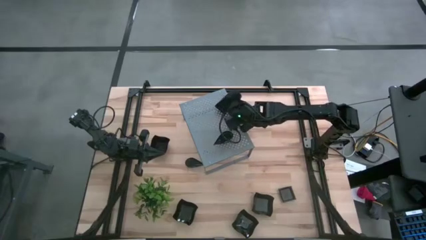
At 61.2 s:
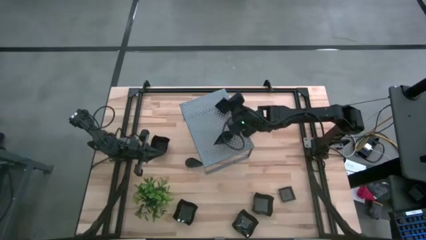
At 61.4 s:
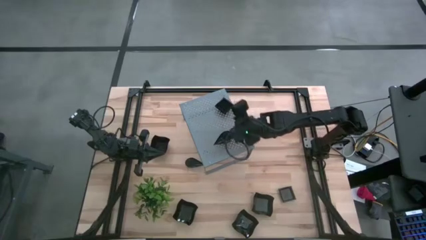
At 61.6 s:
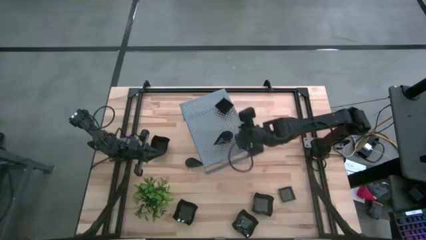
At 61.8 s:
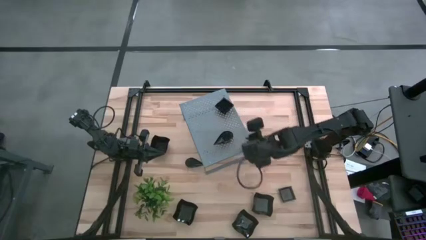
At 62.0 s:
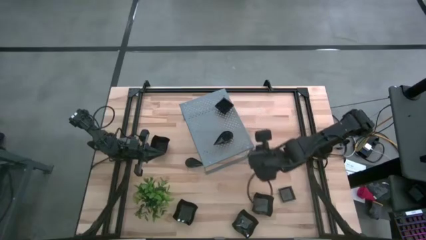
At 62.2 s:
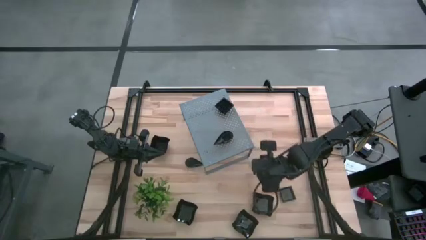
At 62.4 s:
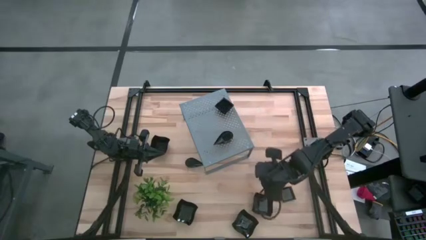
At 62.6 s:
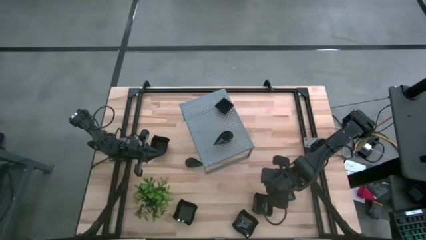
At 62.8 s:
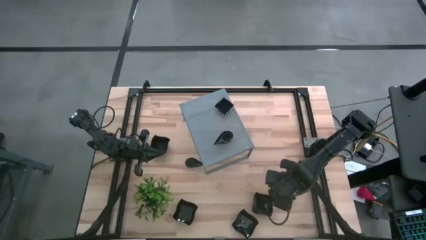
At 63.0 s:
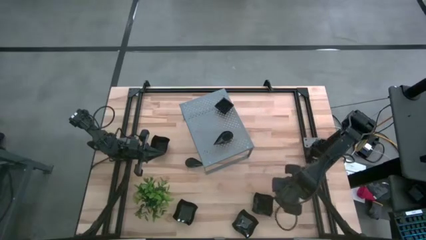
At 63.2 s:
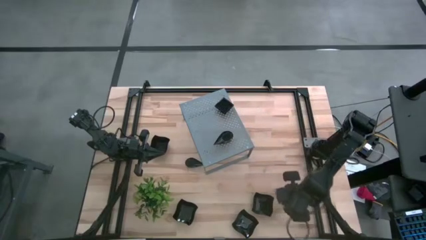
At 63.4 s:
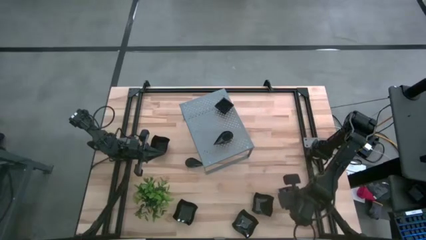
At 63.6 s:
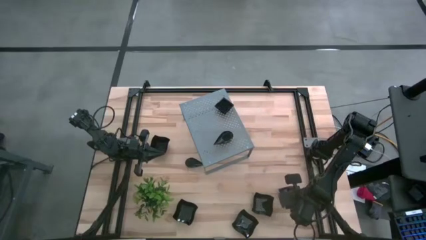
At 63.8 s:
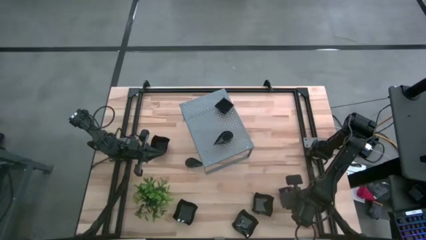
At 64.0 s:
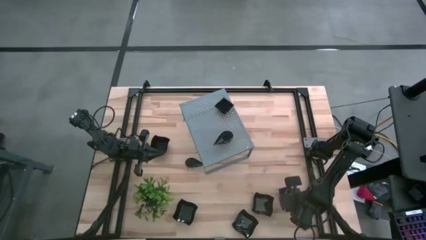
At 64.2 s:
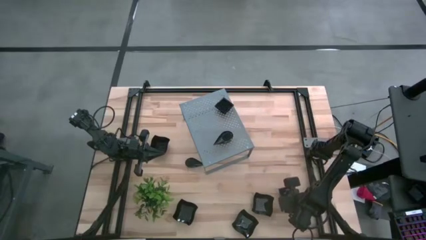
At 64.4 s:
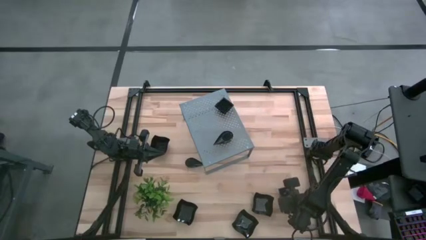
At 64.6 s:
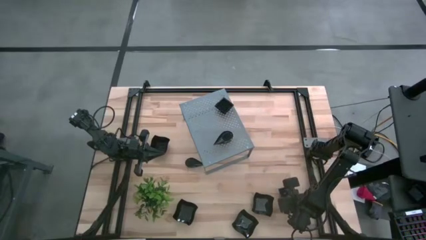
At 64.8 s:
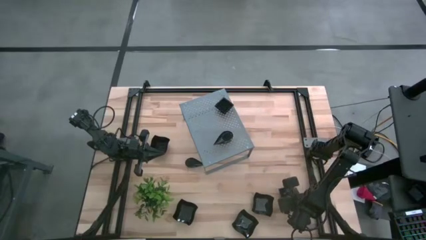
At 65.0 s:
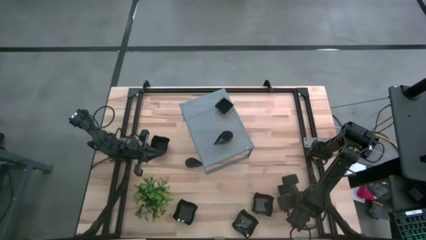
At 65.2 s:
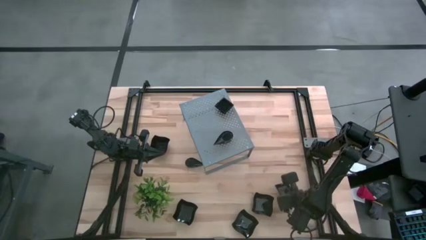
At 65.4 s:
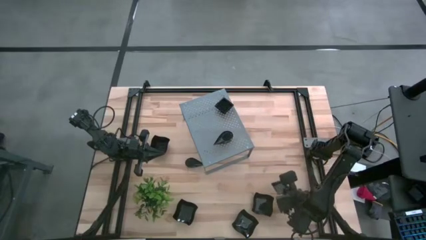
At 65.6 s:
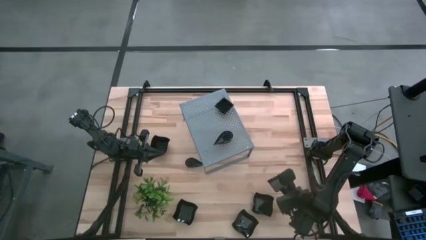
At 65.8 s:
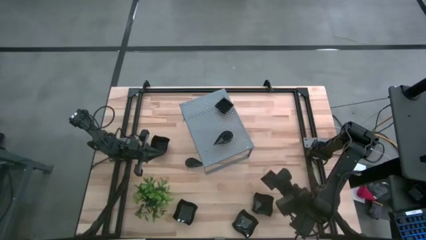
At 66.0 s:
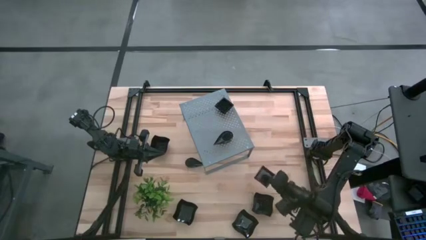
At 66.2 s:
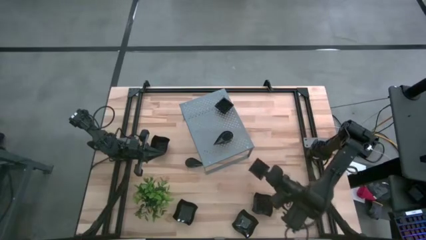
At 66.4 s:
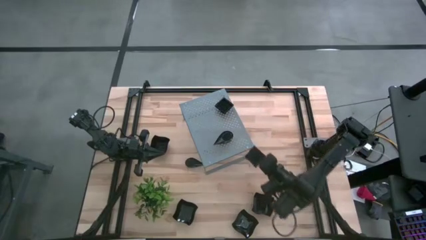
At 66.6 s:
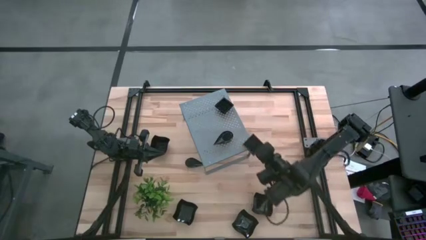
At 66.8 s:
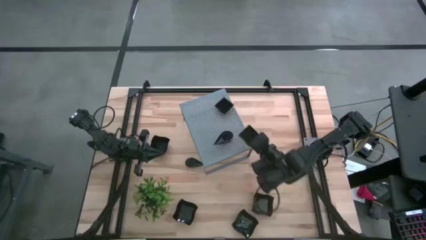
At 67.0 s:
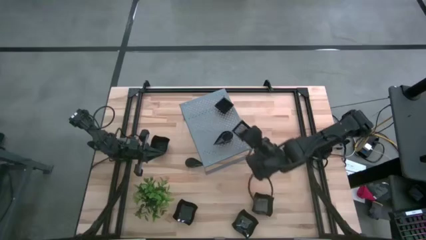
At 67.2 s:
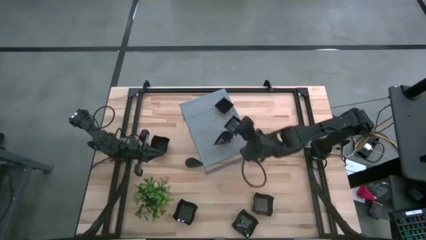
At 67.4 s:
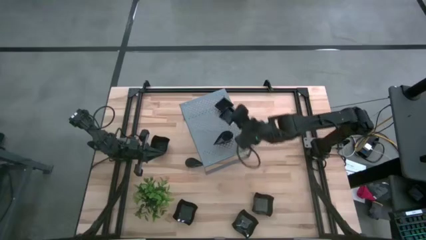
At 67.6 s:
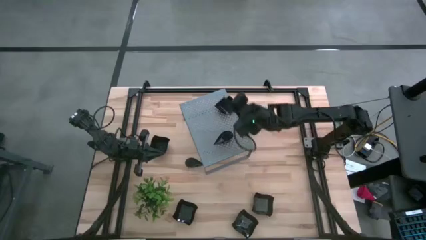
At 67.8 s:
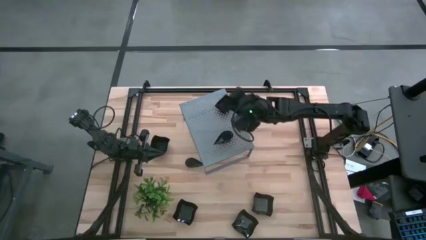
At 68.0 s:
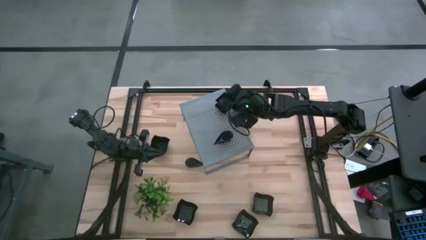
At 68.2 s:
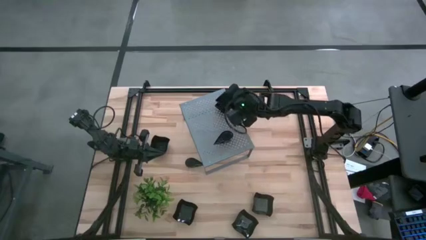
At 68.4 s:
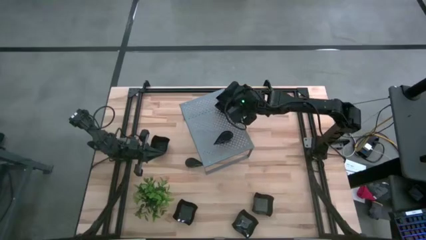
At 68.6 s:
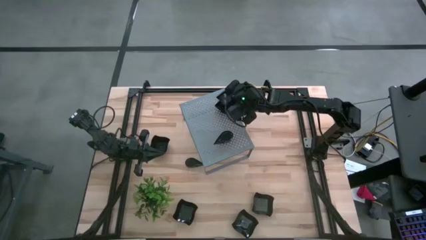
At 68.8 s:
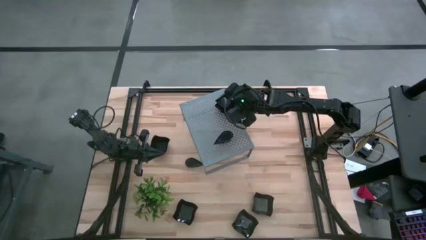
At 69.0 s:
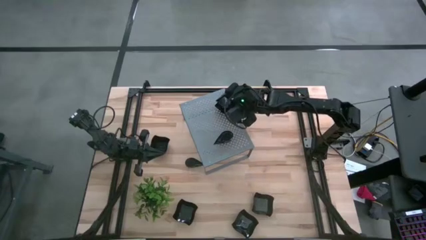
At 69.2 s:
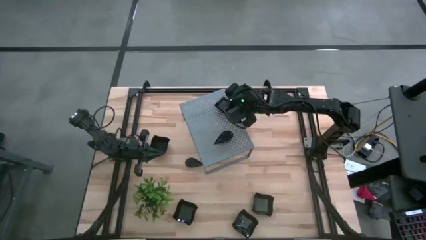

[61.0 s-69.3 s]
Task: Pick & Place Mini shaped plates
Stack the square plate on top of the square plate on the shelf

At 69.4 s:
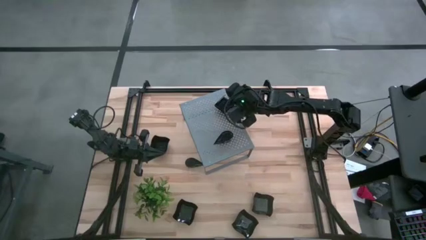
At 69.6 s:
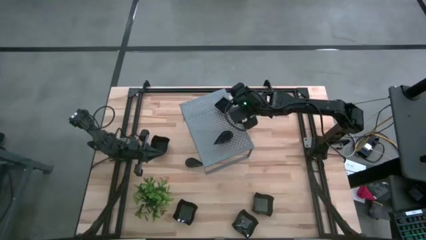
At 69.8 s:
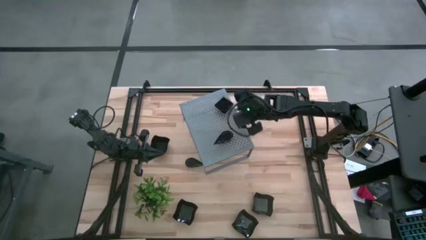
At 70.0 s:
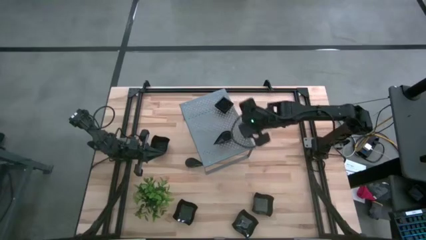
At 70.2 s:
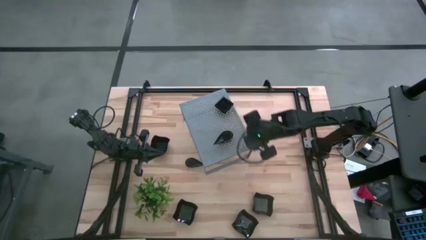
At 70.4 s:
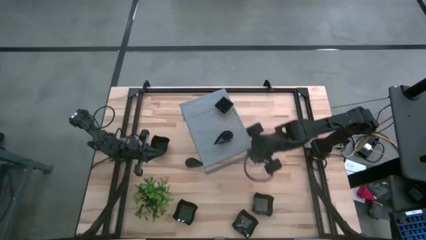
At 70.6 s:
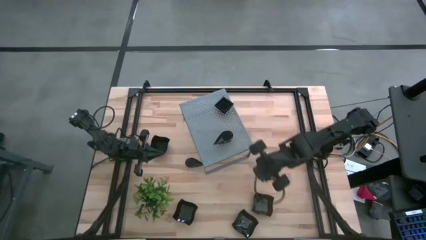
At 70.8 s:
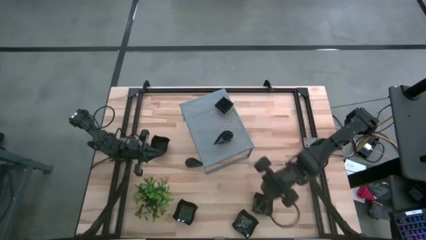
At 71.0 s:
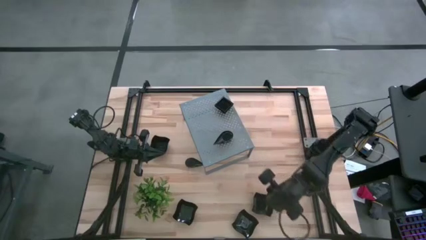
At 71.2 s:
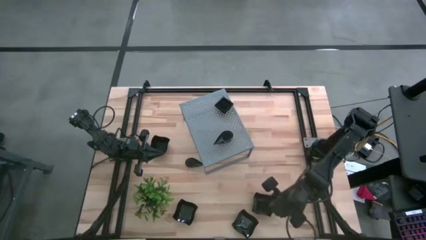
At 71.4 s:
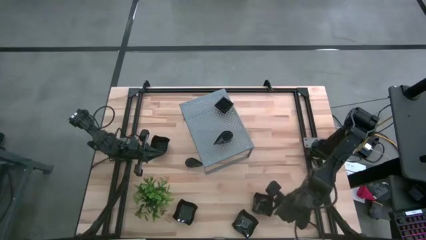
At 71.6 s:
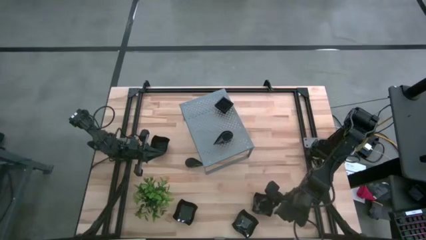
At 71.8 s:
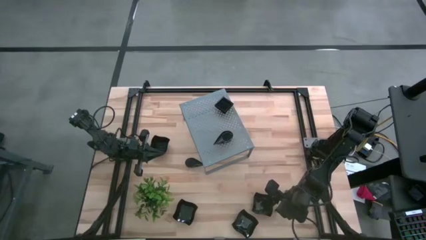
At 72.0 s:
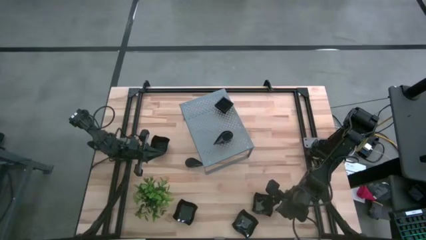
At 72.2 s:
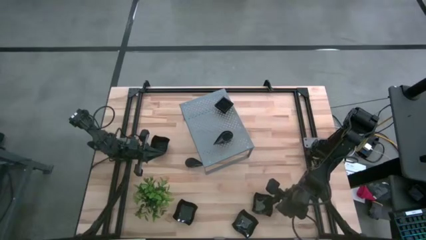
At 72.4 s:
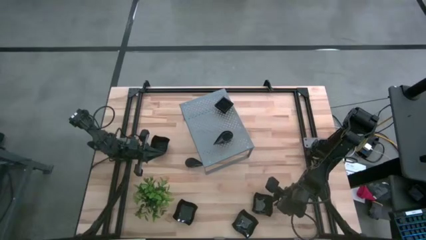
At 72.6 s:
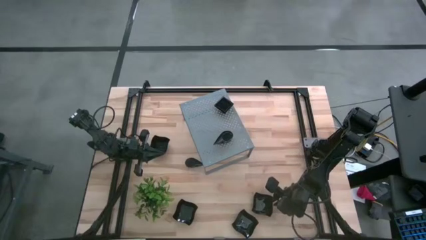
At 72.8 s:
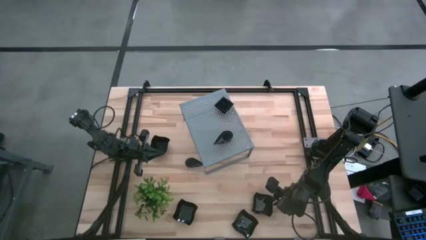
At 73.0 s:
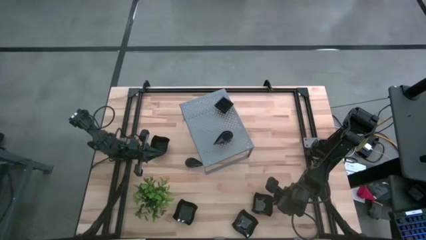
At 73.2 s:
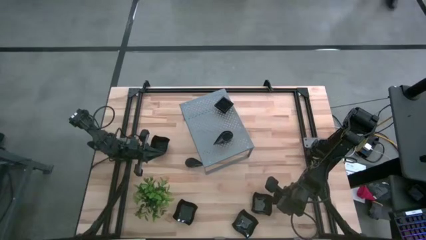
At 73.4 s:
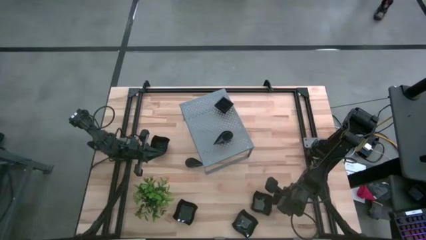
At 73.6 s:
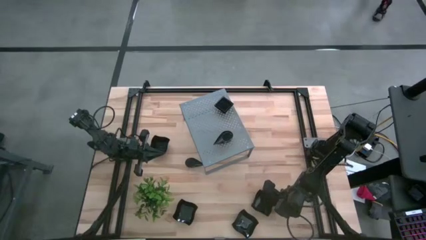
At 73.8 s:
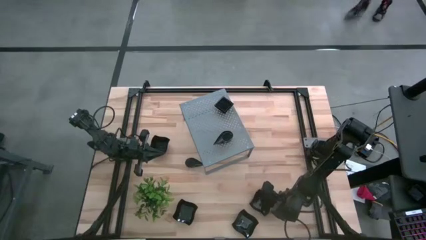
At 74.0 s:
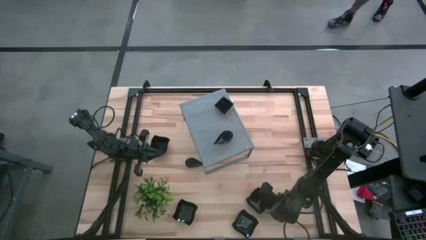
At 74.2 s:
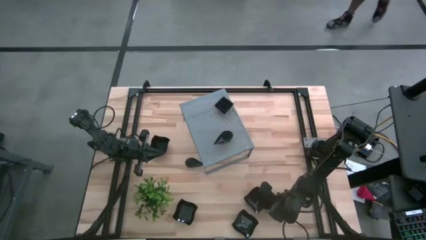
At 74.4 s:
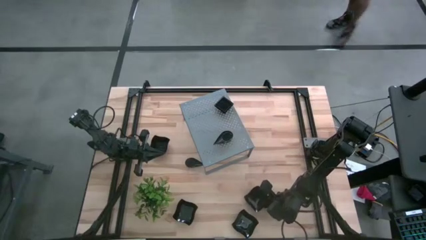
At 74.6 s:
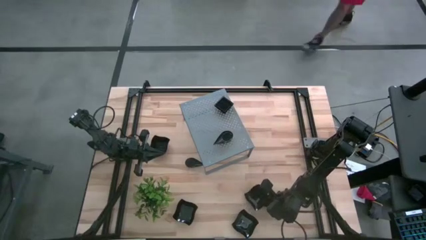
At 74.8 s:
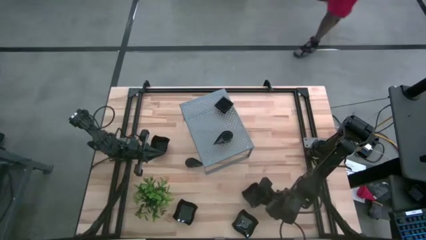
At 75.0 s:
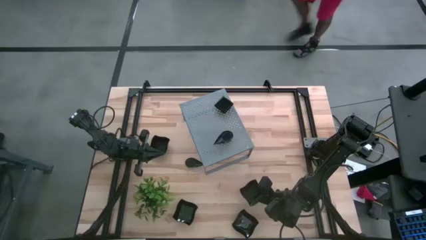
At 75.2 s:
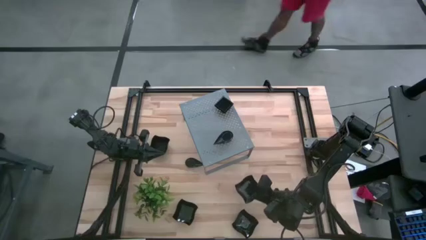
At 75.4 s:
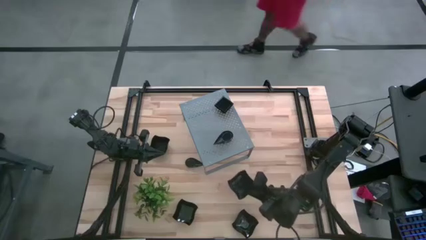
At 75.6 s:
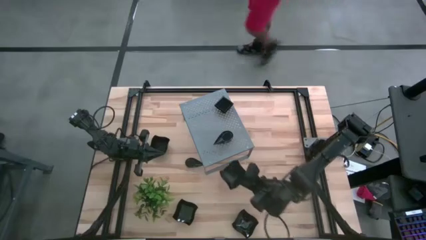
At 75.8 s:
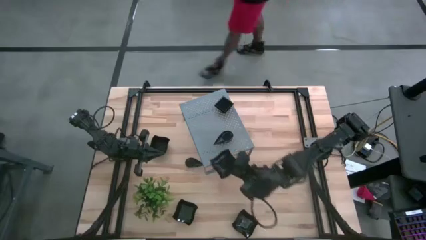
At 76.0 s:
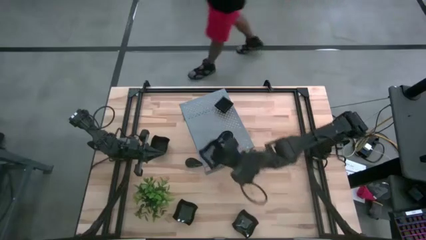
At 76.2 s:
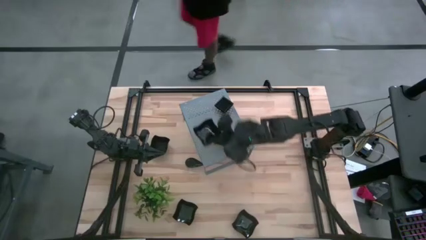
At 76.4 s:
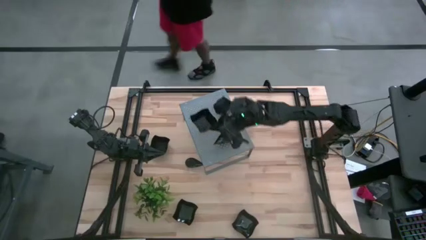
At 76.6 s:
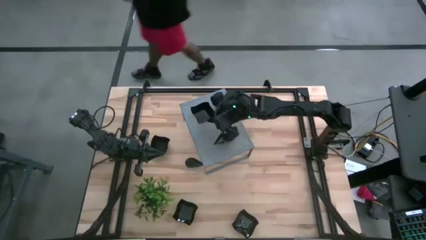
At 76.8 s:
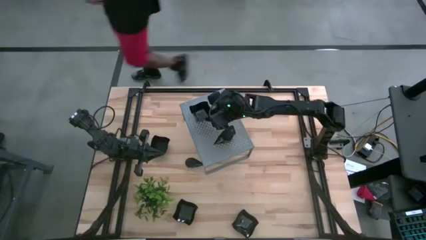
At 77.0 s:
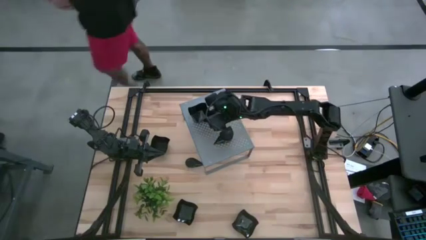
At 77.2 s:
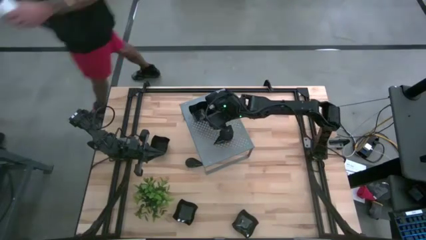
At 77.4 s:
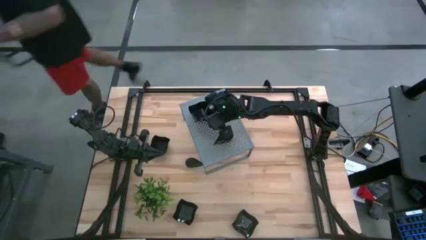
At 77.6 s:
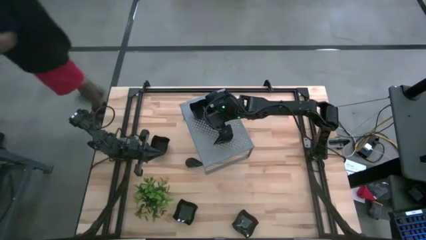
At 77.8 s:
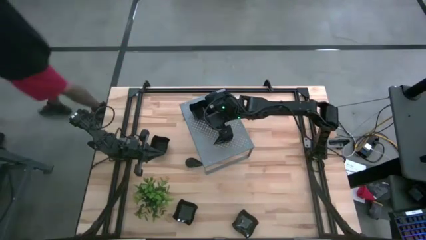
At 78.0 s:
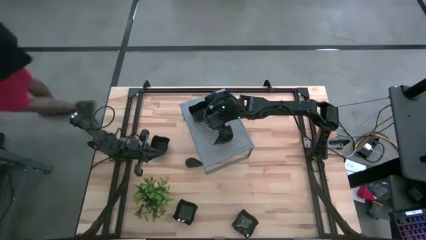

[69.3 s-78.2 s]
Put the distorted square plate on the shelf
